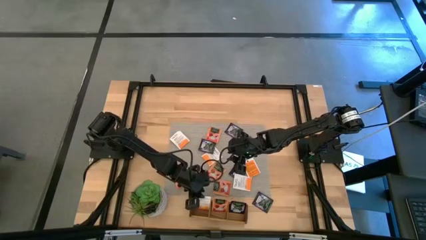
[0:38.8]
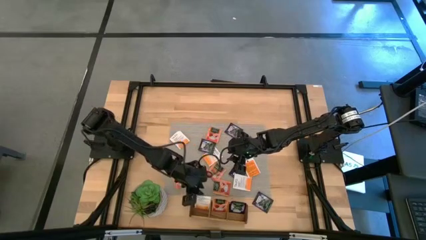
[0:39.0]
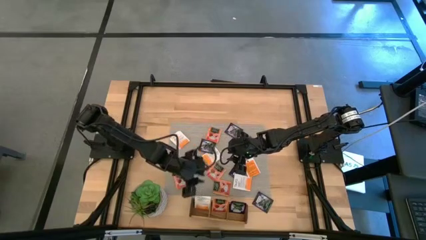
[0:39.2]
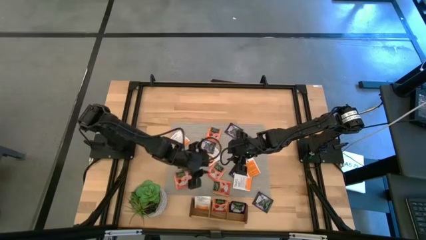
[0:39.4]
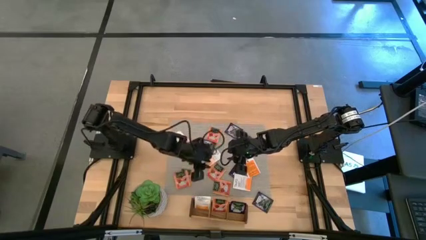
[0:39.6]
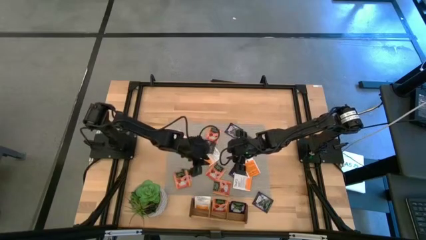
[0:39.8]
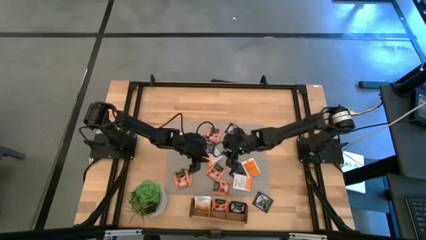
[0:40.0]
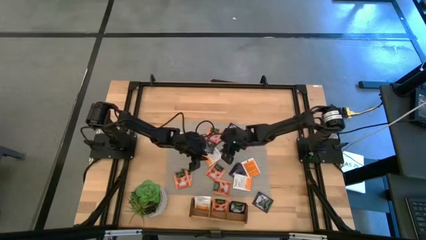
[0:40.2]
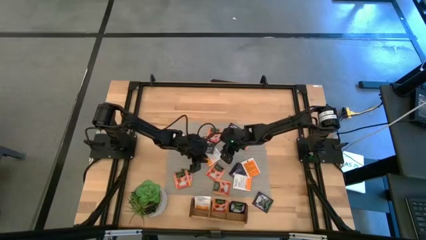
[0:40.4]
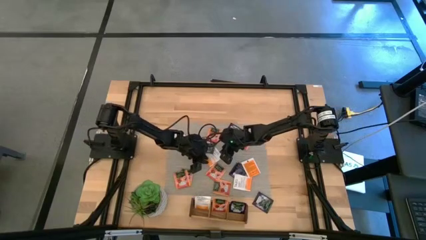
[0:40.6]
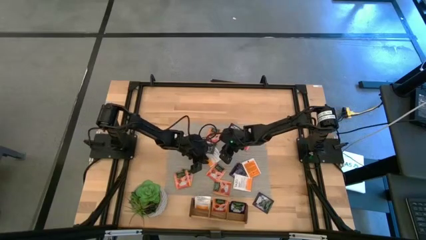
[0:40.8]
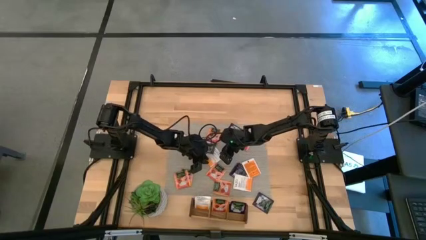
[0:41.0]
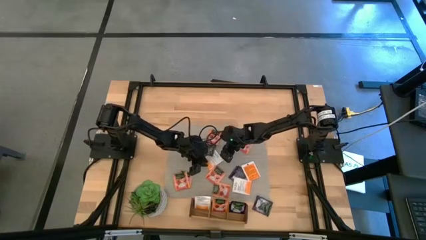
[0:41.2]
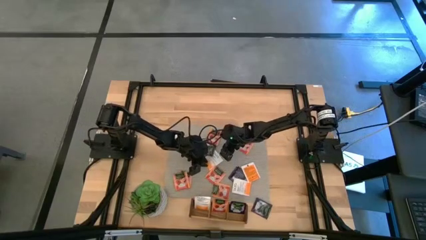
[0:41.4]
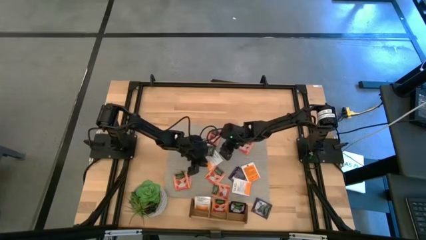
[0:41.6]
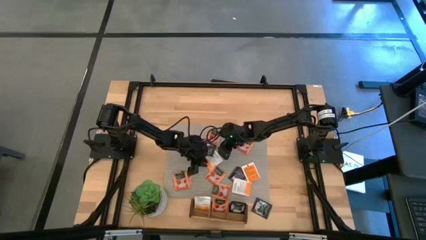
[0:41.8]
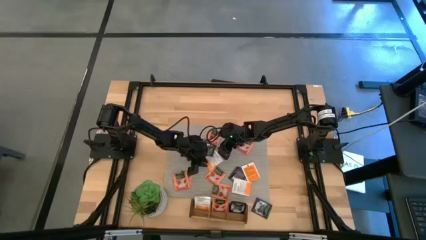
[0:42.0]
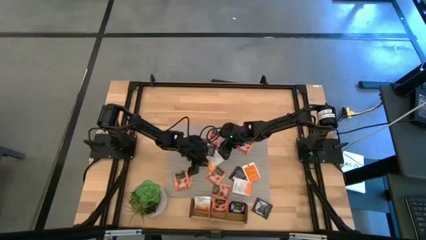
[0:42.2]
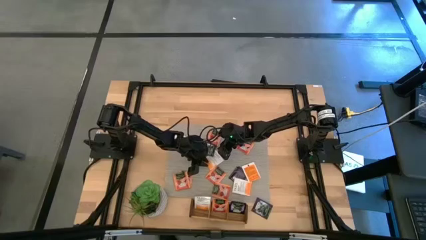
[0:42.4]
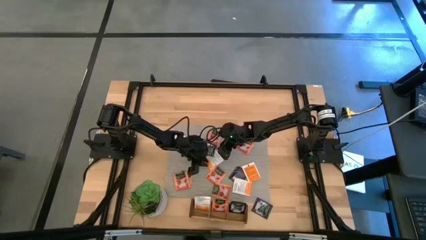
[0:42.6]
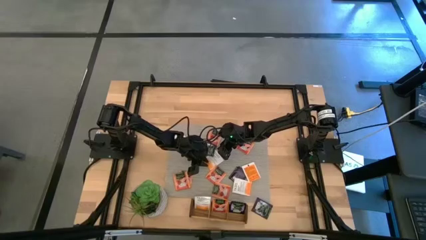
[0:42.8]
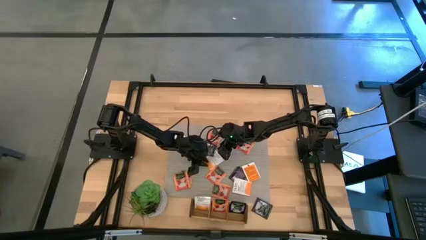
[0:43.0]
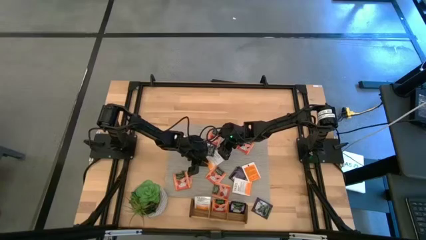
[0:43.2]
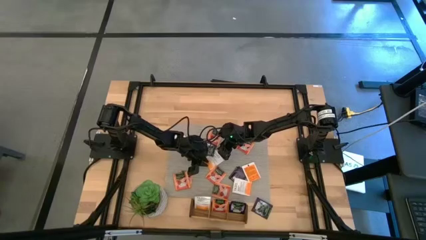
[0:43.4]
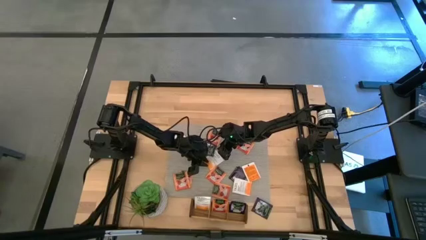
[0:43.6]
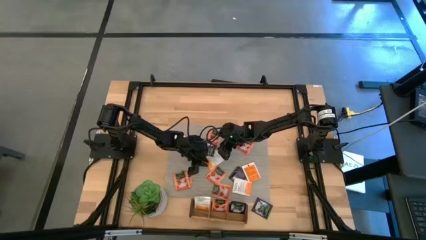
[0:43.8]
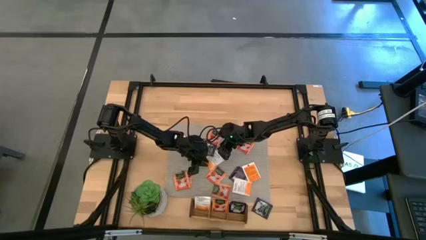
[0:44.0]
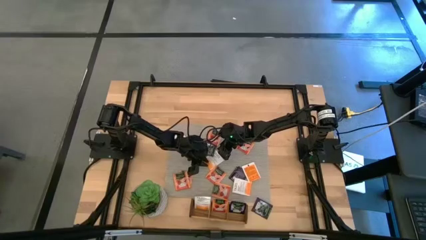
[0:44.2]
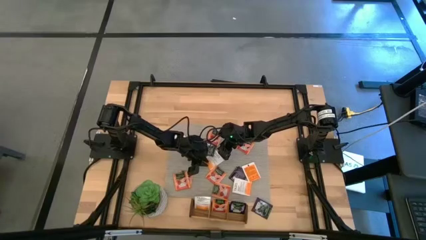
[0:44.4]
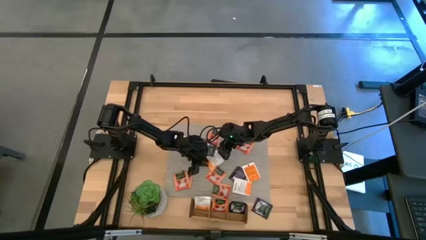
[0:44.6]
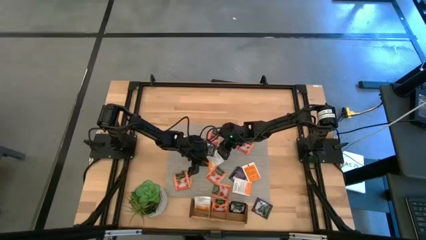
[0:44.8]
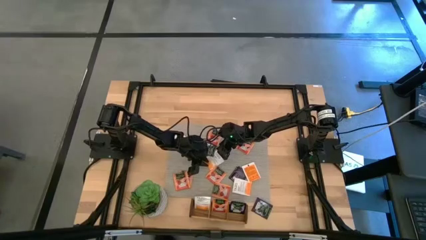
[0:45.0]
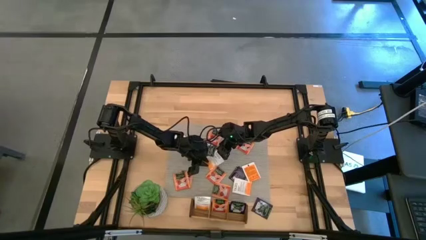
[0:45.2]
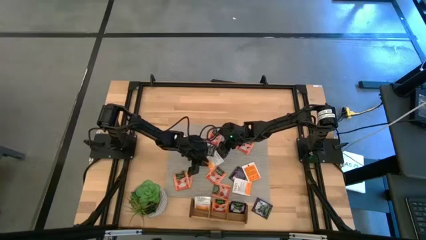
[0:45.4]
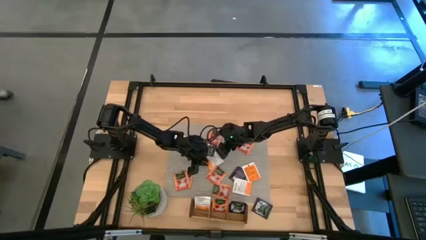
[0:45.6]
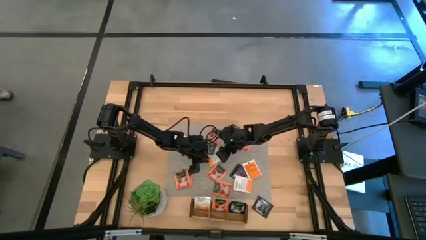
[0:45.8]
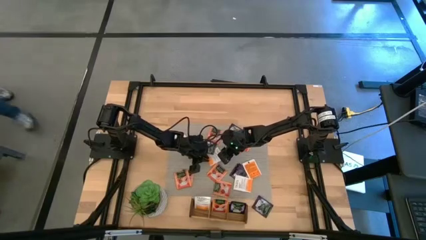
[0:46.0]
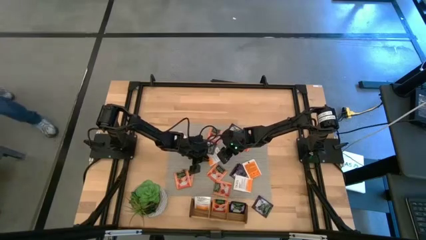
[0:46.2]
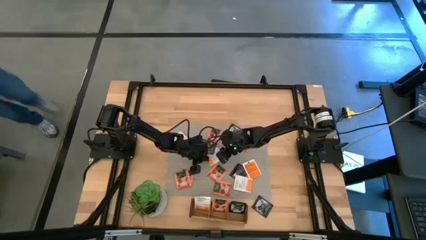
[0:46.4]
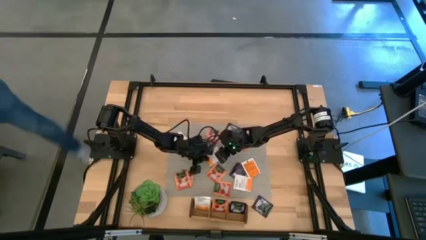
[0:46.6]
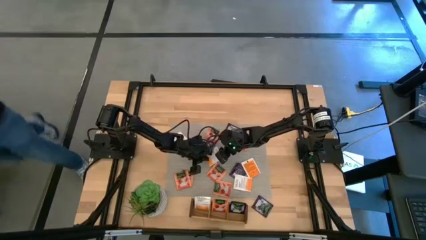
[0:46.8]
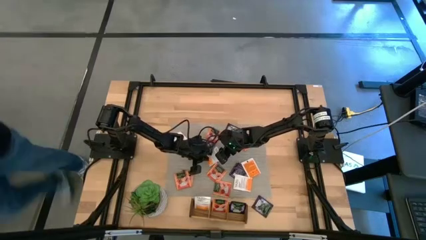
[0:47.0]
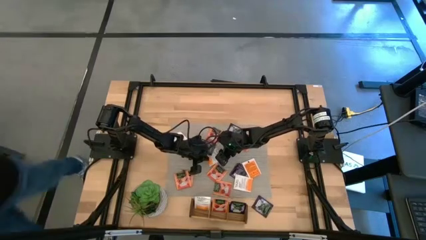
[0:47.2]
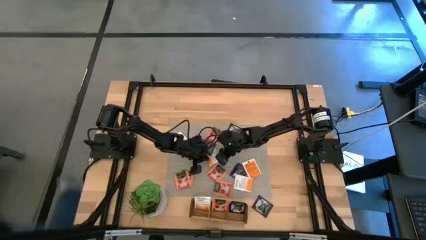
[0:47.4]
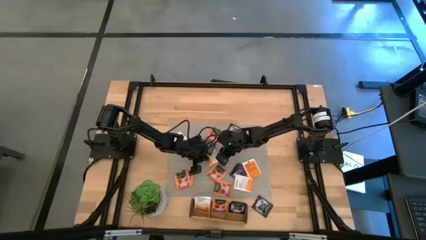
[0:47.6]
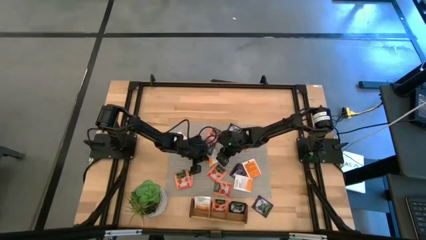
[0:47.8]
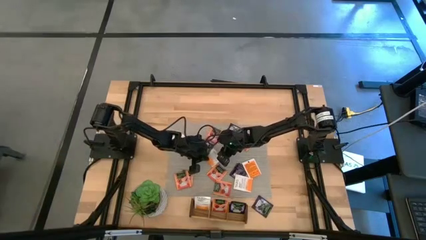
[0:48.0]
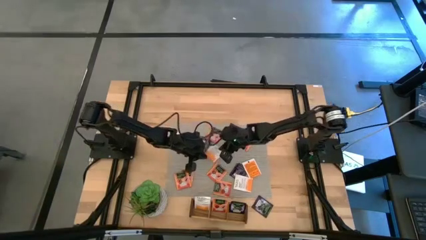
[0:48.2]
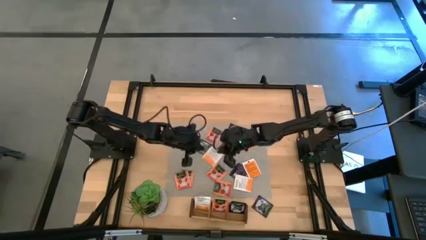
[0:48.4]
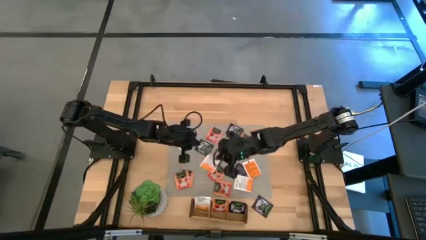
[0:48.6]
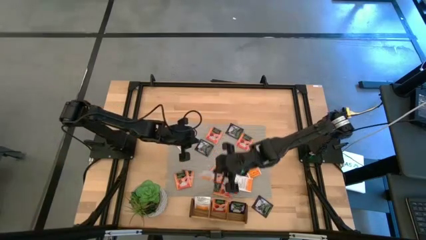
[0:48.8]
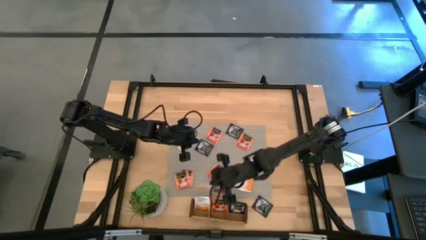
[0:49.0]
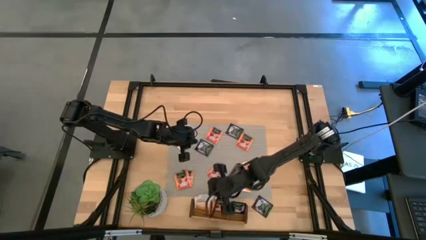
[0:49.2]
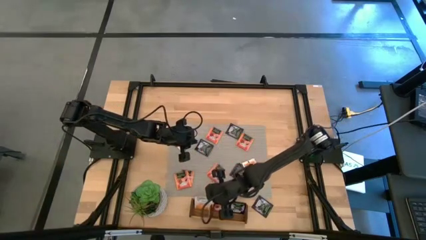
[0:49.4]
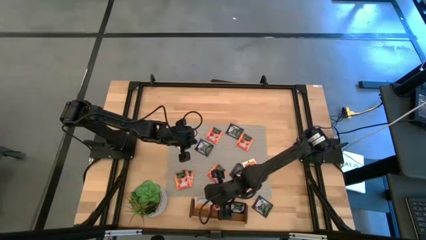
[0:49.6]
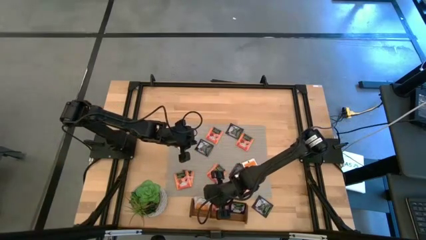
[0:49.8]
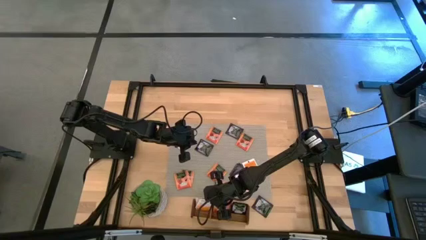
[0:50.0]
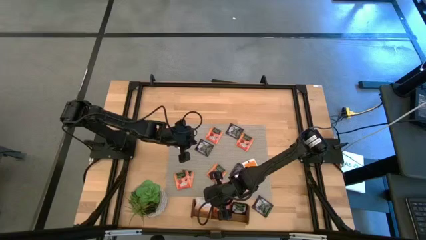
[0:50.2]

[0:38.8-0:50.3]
Task: Pick & Place Tea
Put the white and orange tea bag into the left section of the wooden organizer

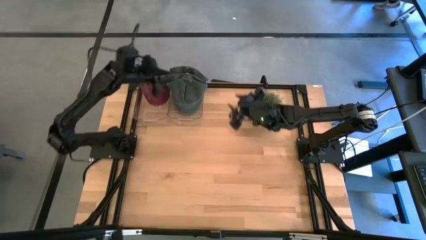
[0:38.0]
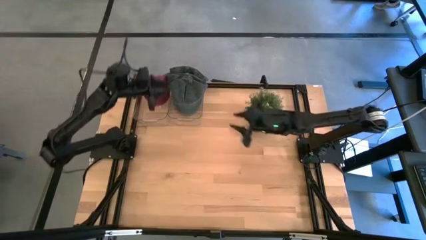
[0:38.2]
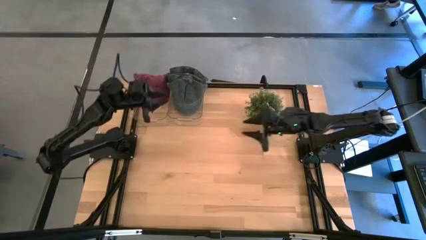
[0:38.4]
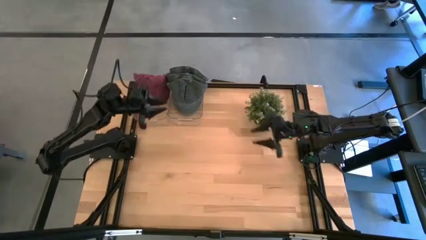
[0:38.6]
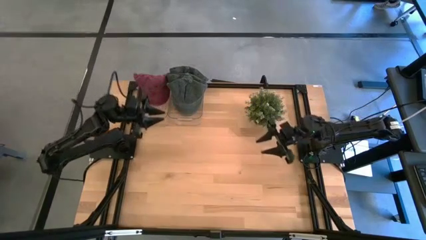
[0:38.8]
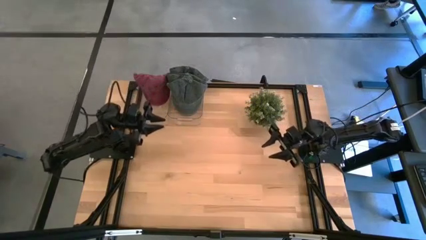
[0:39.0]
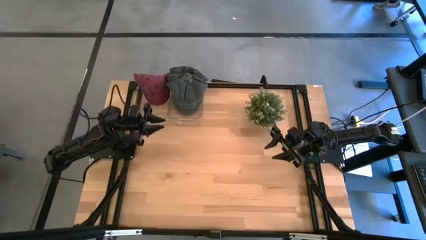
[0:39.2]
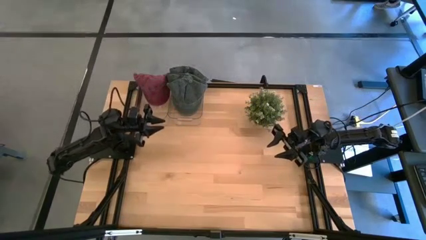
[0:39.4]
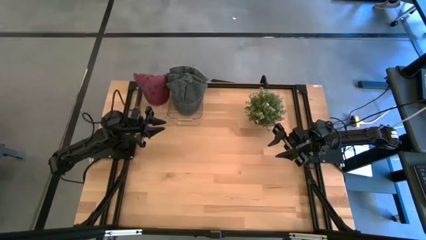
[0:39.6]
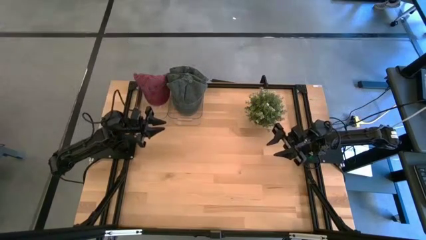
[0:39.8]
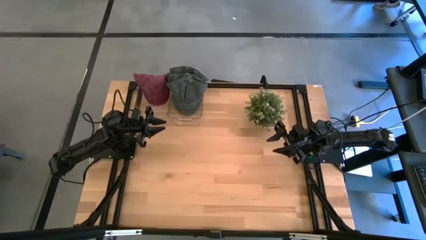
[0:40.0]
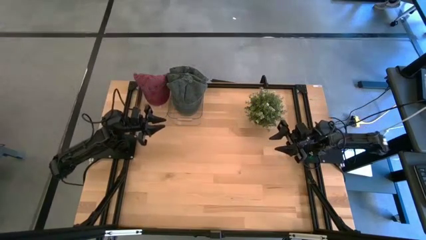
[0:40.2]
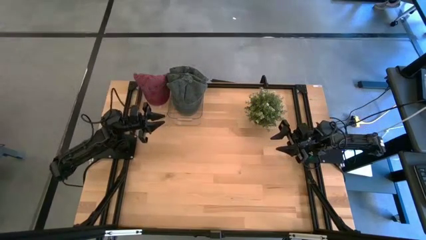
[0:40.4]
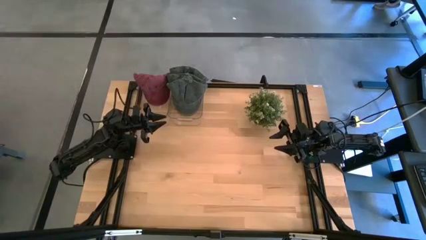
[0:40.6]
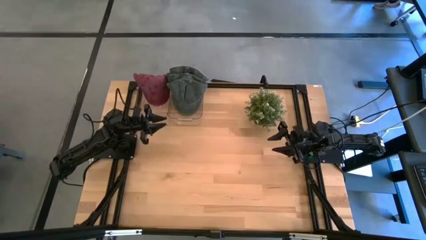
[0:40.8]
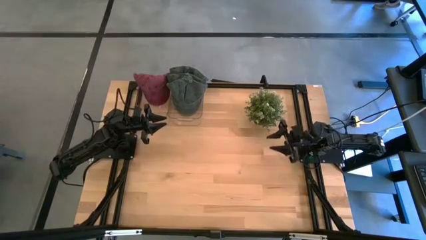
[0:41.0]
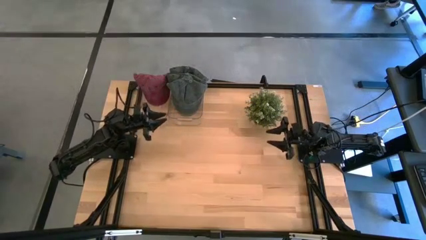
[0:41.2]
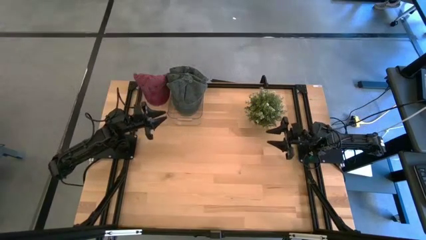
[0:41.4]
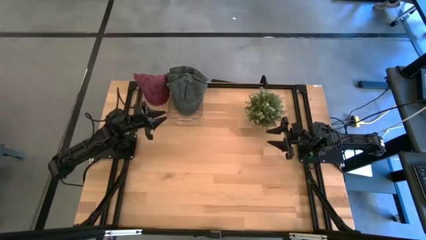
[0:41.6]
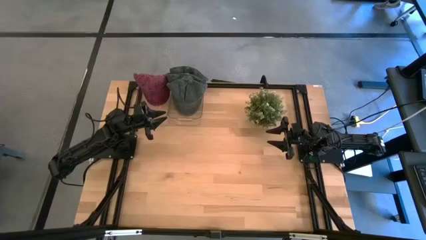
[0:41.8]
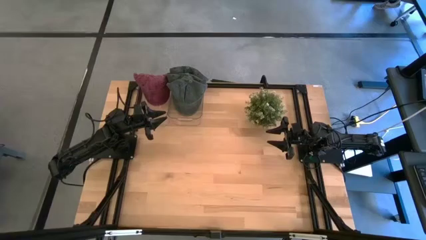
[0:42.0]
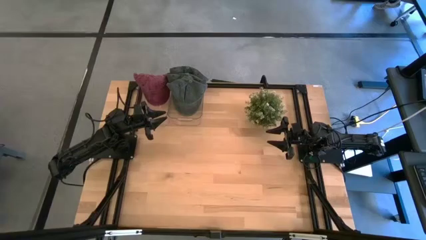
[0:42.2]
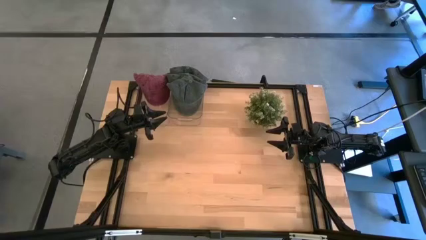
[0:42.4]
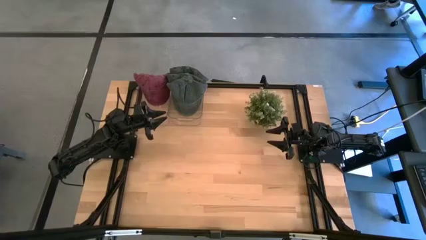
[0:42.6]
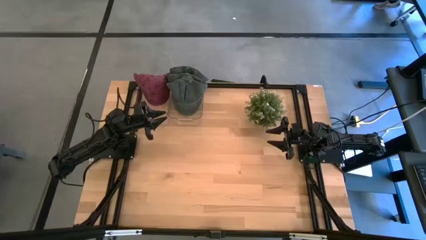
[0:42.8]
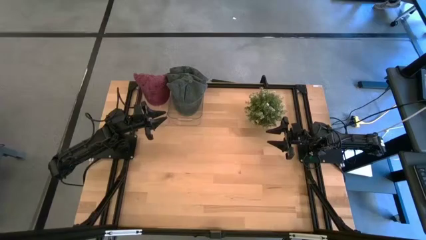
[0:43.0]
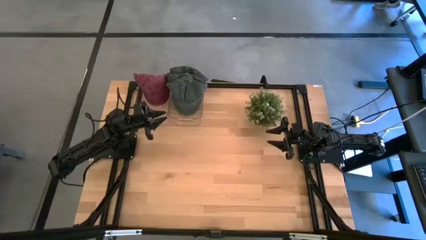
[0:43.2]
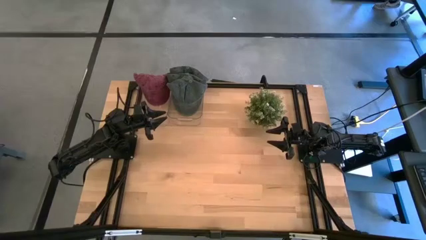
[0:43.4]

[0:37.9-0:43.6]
Task: Pick & Place hat
Return to Home Position
